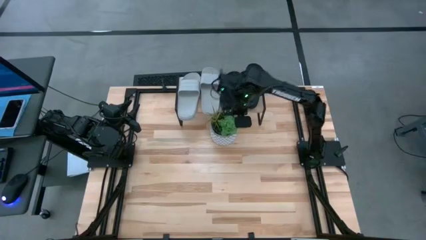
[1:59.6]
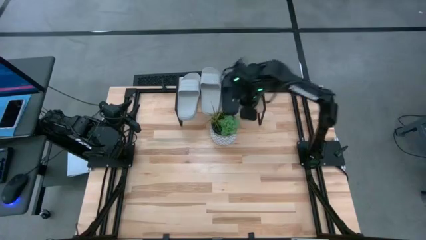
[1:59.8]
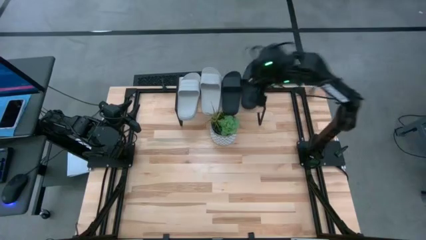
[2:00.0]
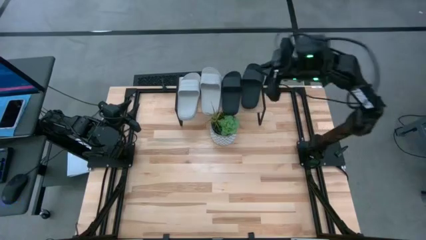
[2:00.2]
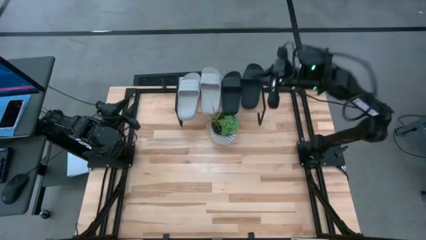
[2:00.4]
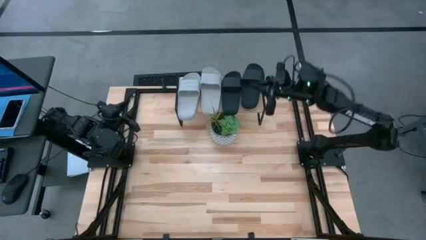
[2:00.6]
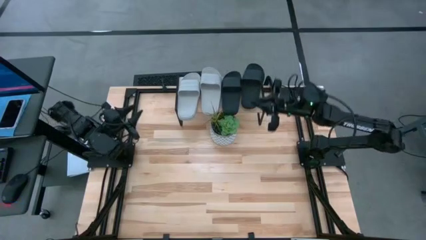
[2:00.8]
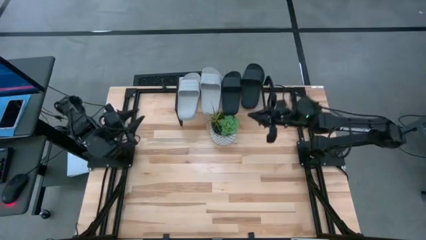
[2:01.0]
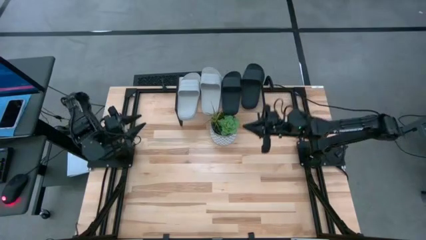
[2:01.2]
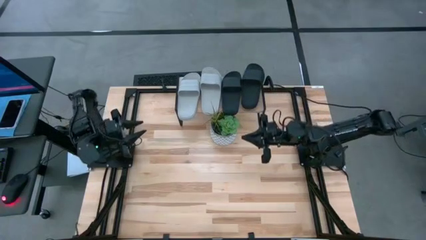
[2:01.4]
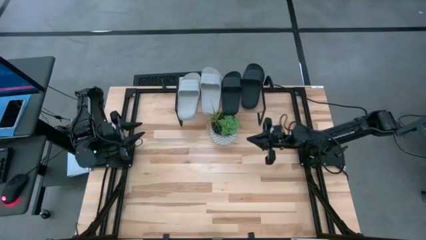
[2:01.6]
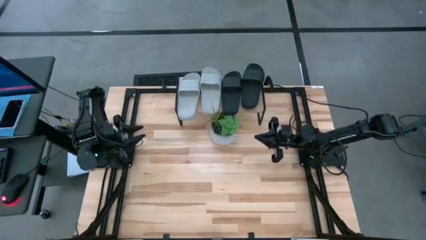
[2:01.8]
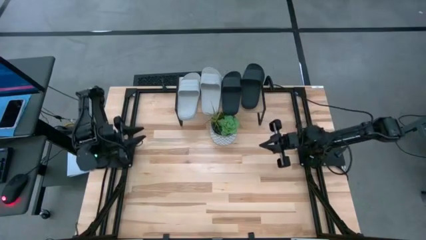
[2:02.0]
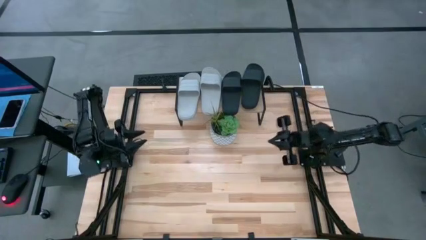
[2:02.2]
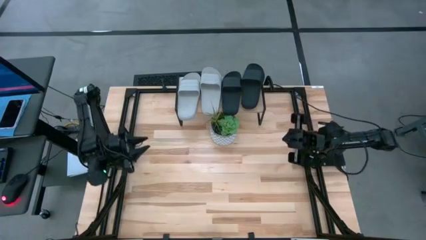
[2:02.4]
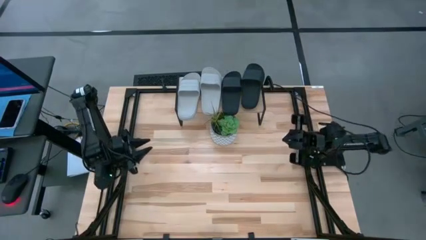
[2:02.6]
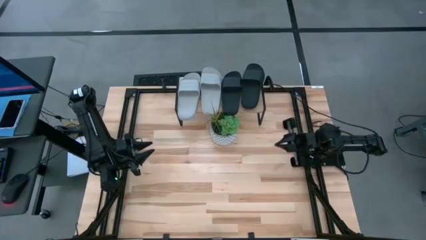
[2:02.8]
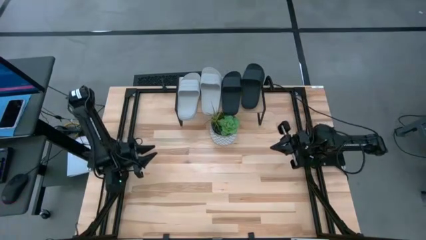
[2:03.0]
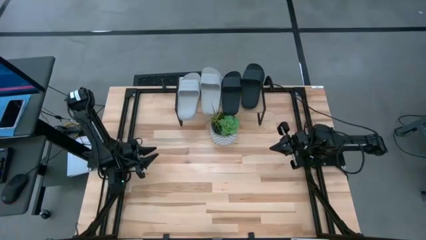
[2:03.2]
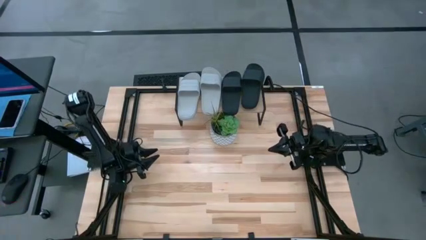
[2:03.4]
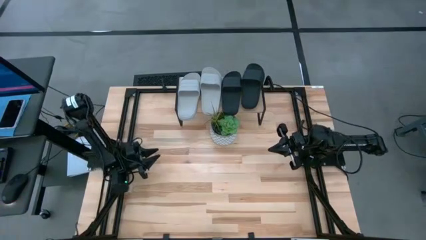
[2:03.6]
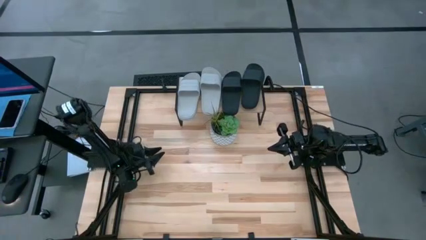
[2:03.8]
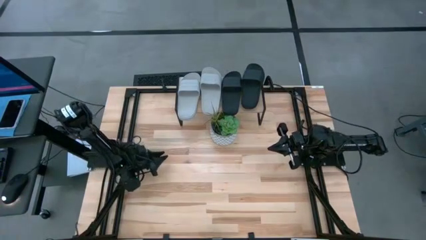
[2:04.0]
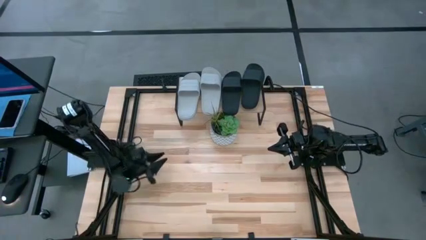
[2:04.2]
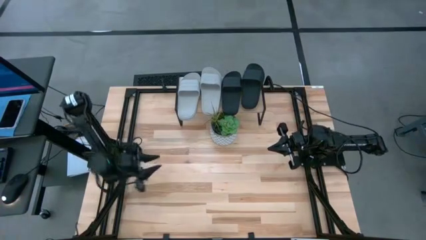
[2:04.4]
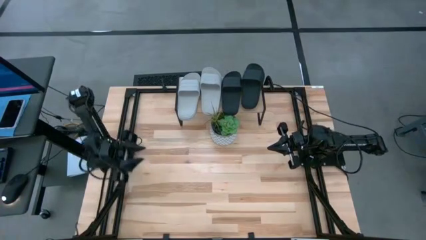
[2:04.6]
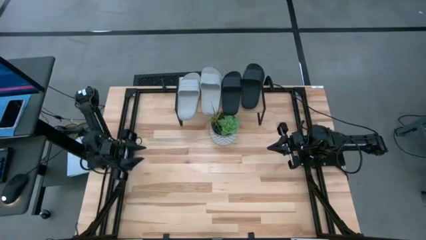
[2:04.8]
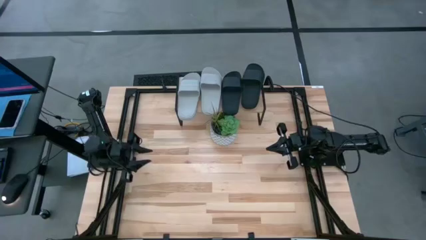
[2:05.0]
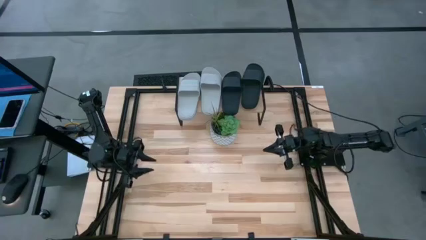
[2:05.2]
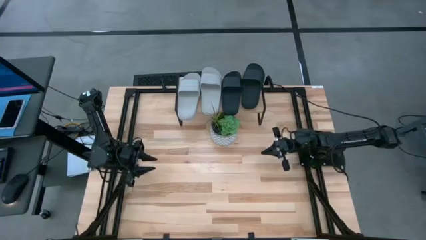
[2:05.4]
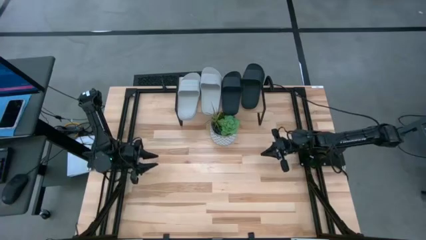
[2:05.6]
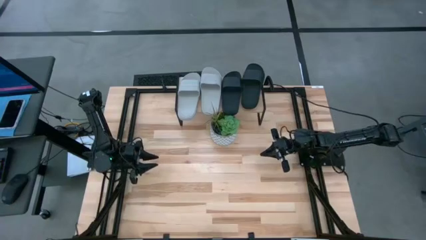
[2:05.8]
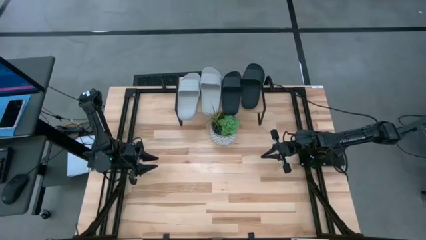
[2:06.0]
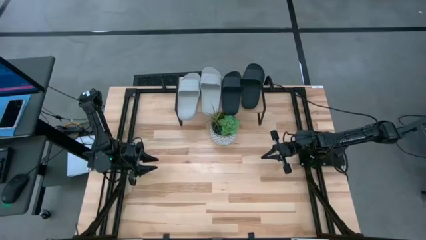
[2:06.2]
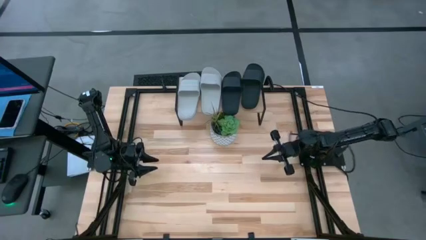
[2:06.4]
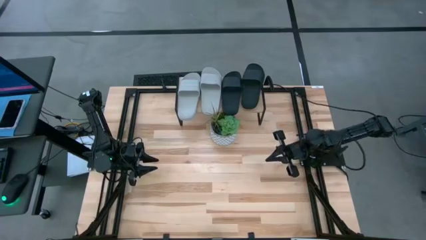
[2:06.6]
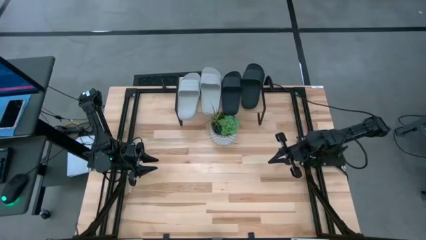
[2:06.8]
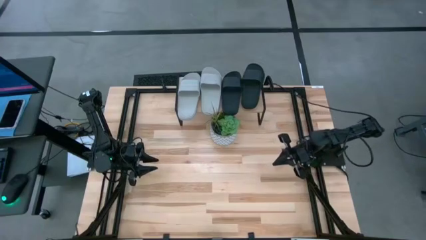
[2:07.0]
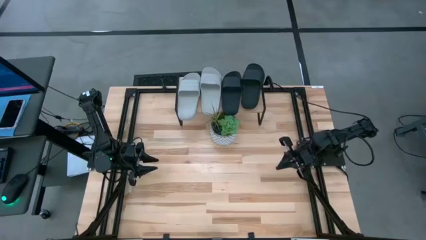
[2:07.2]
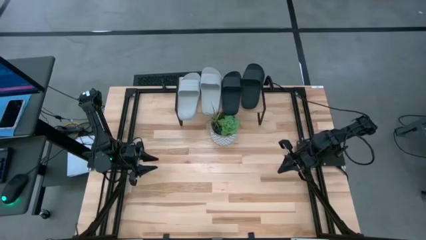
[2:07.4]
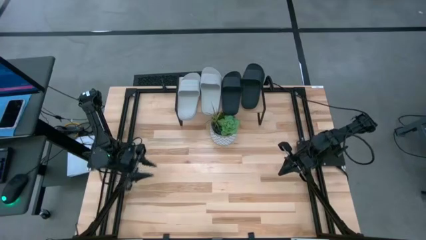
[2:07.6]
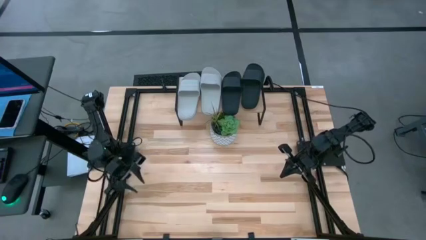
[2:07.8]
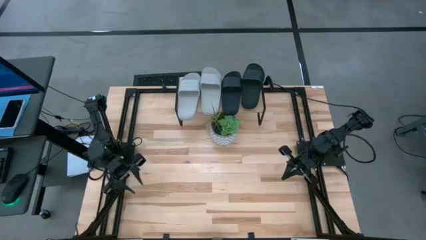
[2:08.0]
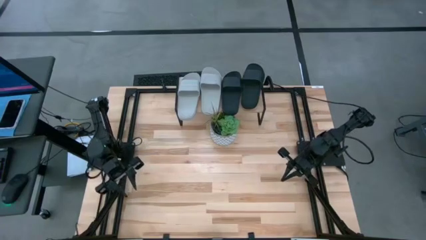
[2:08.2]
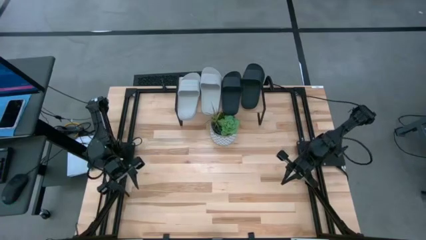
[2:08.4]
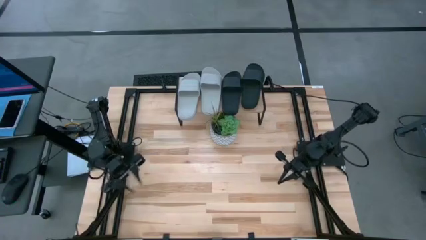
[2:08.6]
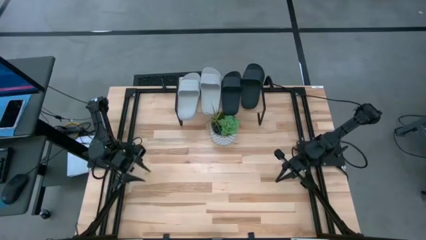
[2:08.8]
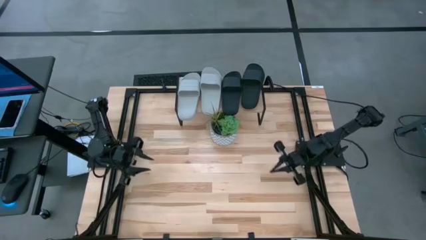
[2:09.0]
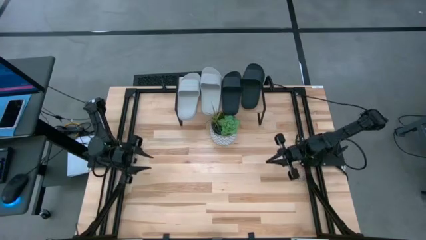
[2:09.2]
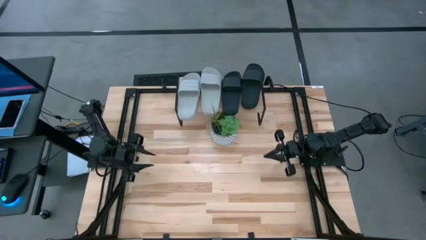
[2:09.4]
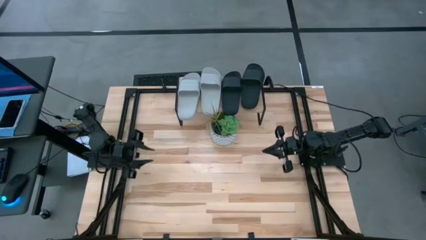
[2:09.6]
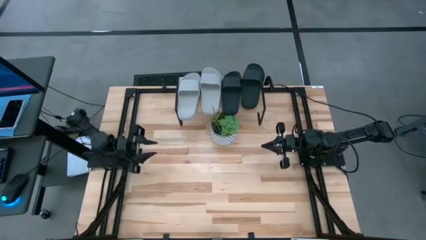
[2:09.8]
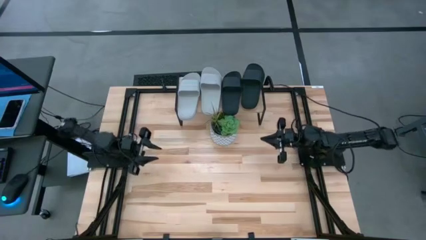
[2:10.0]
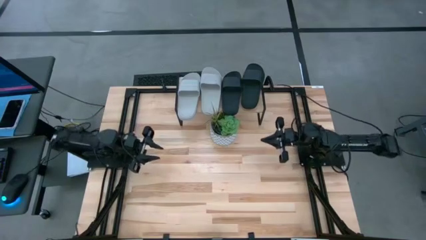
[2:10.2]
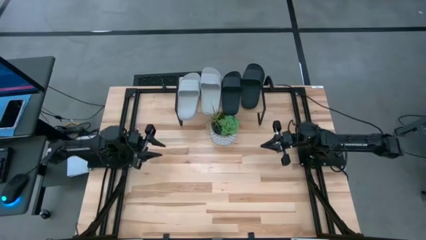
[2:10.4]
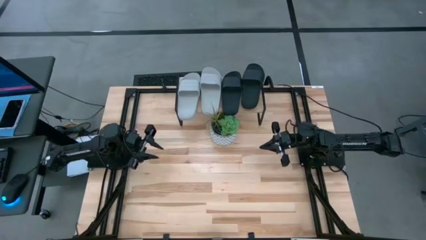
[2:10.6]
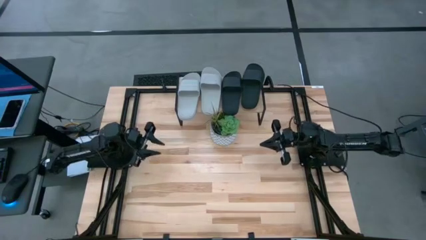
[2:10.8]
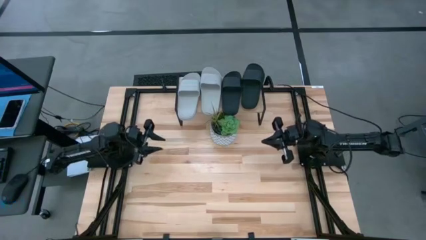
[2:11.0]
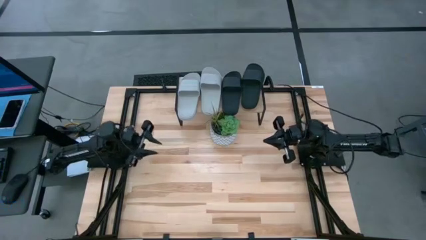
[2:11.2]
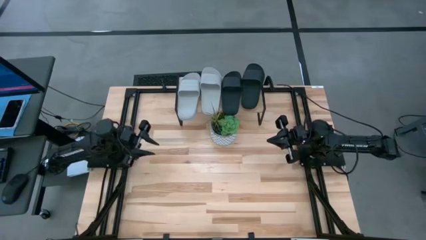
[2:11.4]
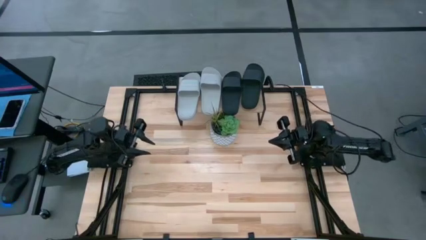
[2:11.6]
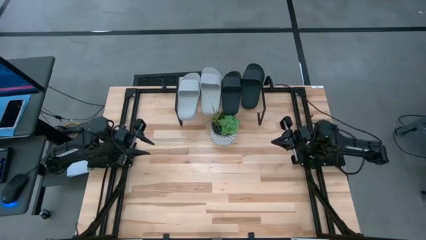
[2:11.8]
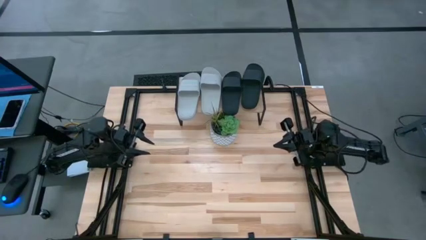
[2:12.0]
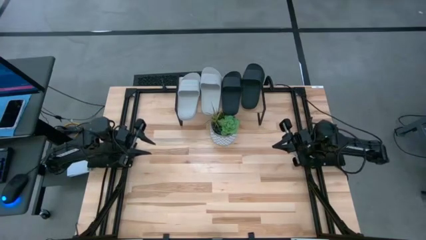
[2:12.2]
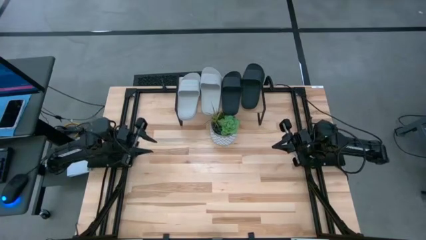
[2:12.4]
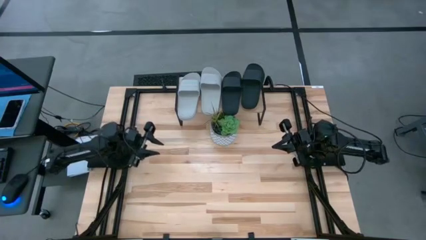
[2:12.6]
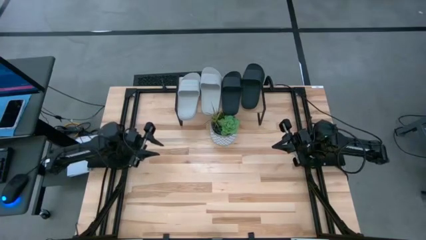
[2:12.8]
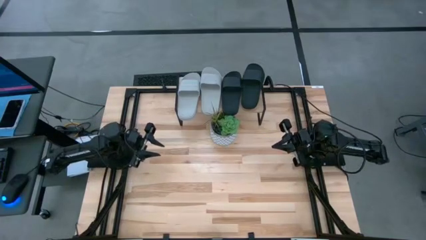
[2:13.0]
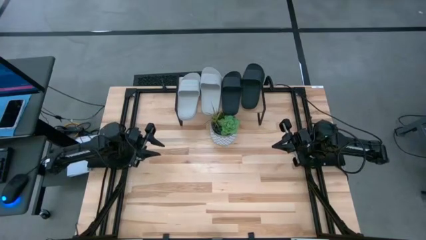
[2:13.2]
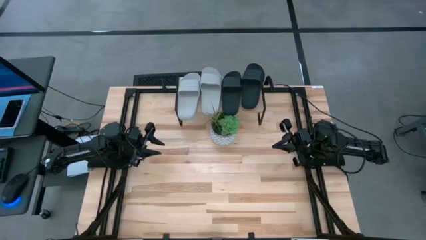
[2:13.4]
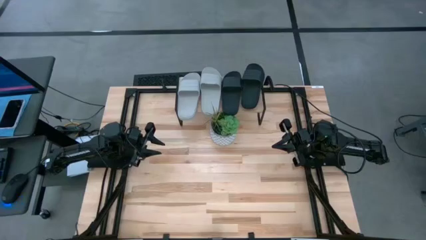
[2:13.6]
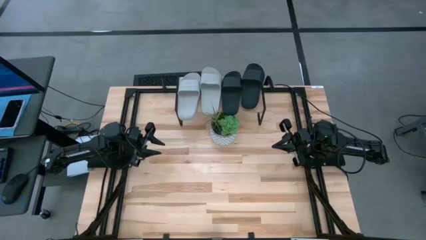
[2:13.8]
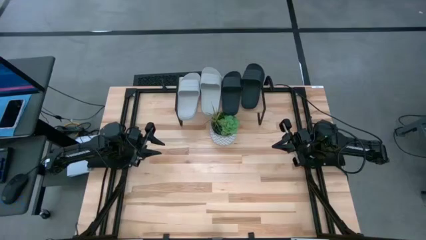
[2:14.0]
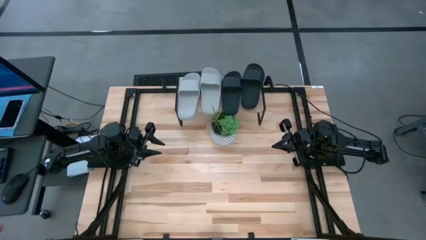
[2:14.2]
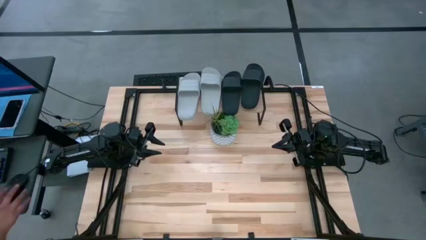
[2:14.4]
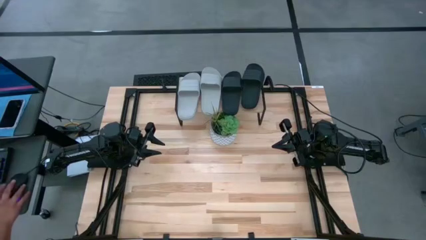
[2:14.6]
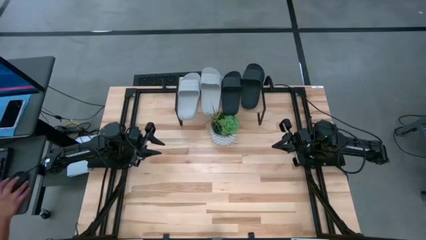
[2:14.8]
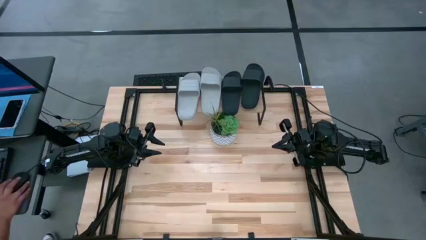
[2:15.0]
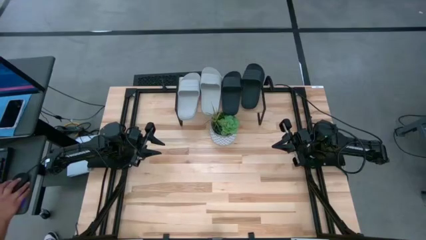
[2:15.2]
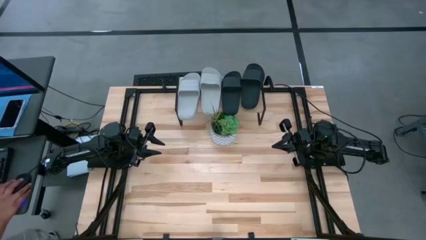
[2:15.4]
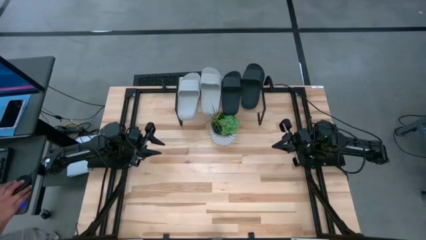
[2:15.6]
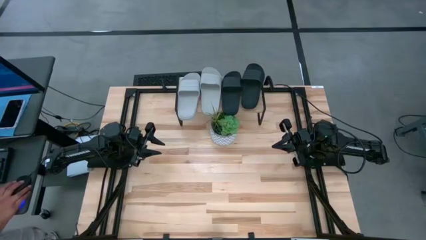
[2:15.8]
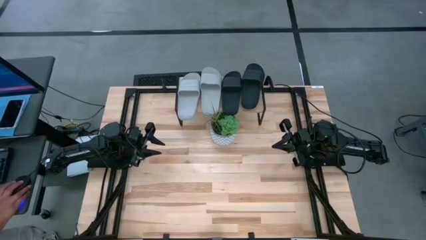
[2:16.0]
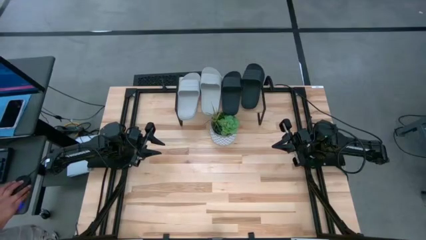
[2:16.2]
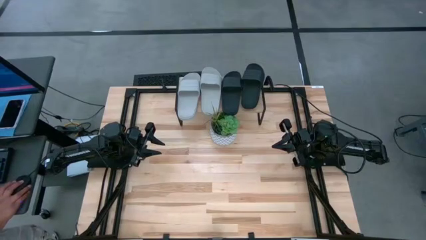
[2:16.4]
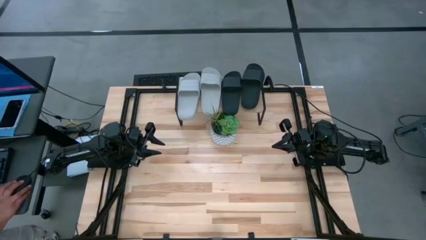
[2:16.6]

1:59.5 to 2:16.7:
Task: Pick and place slides into the shelf
Return to Home Position
